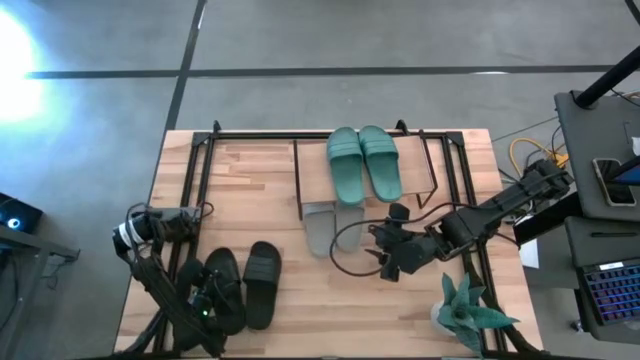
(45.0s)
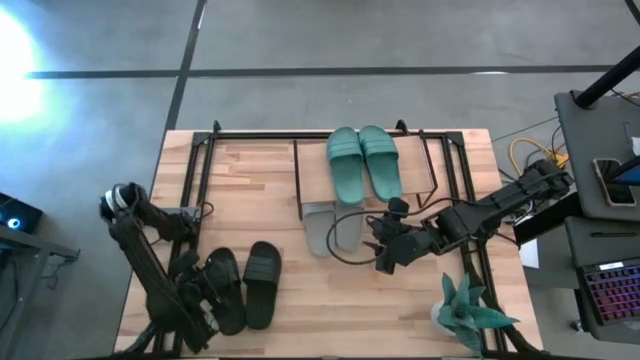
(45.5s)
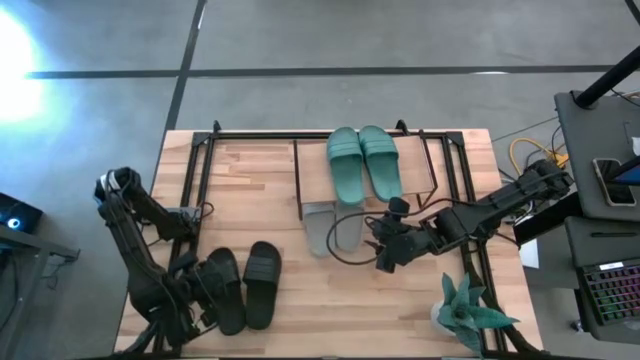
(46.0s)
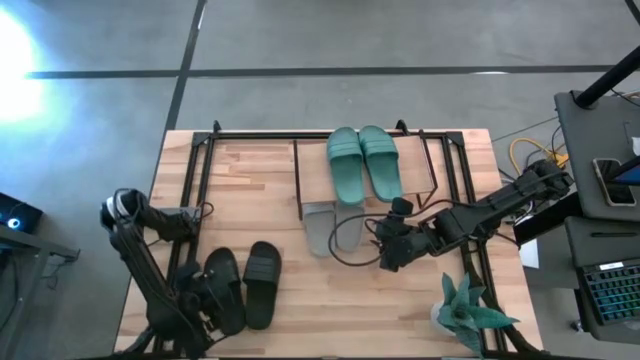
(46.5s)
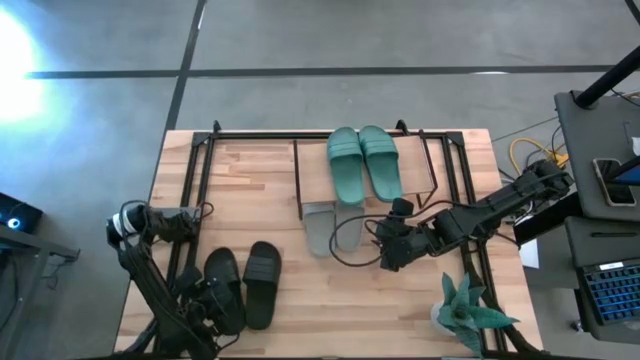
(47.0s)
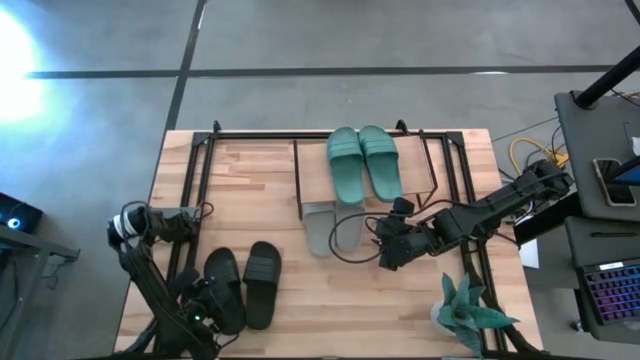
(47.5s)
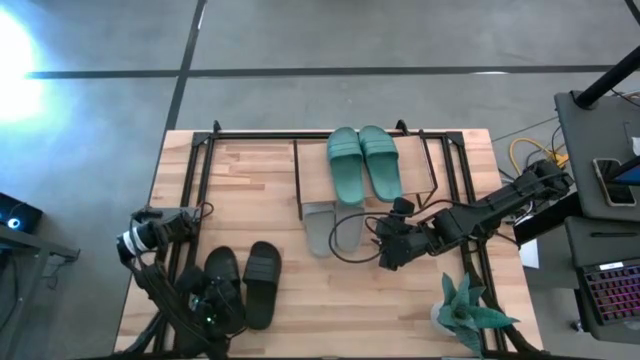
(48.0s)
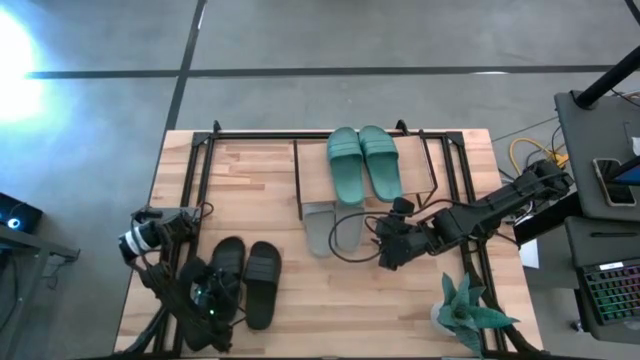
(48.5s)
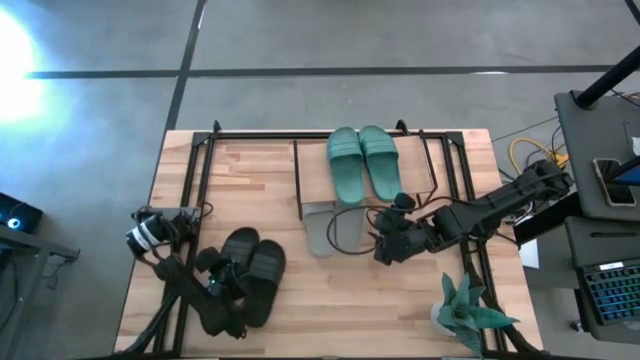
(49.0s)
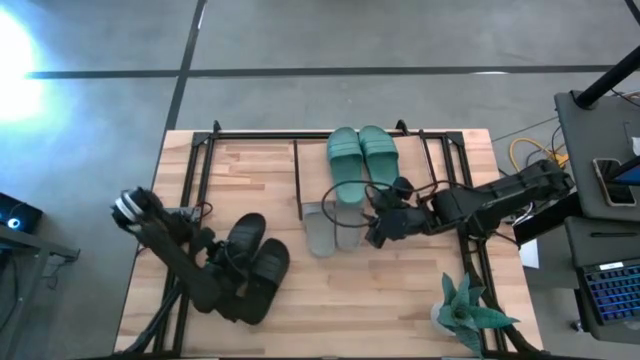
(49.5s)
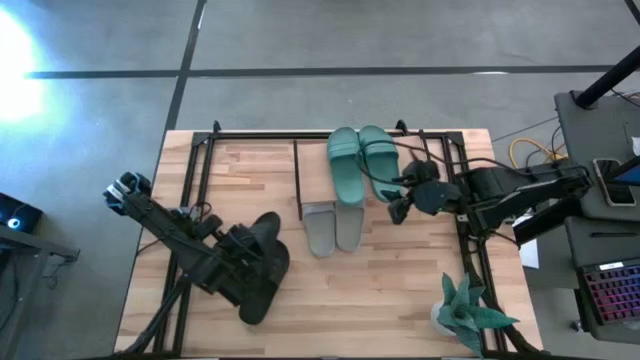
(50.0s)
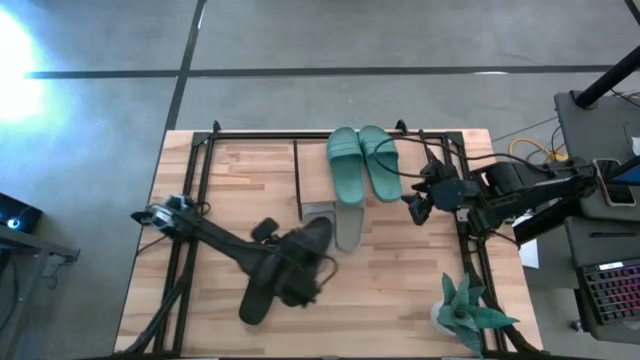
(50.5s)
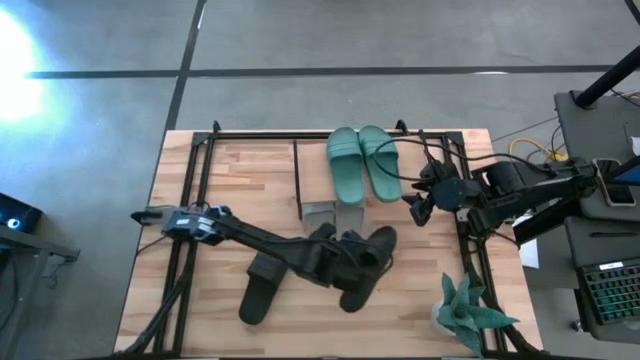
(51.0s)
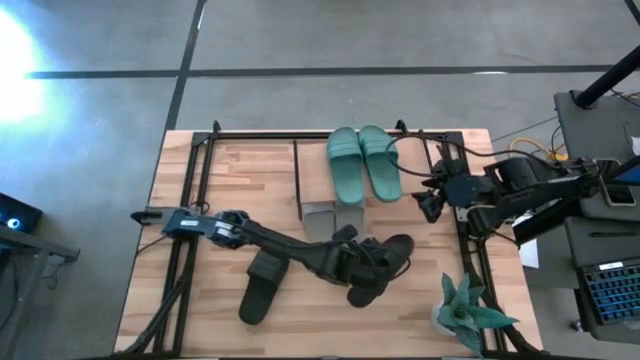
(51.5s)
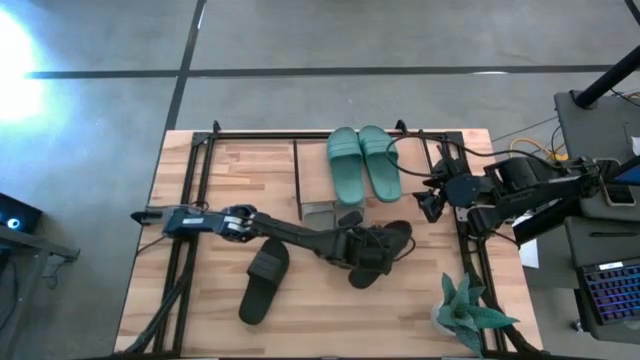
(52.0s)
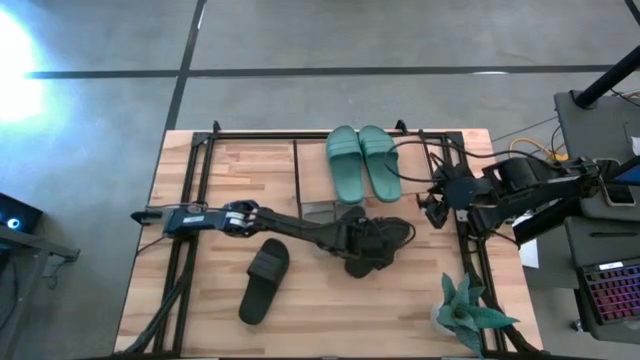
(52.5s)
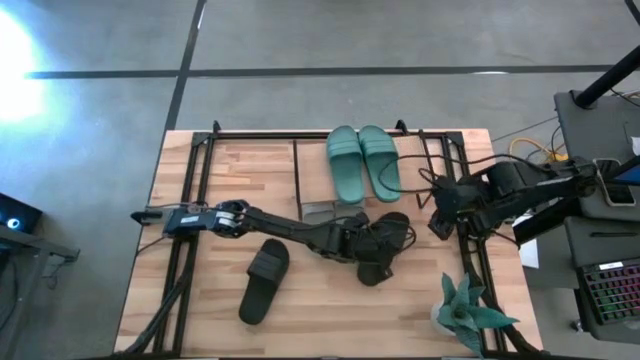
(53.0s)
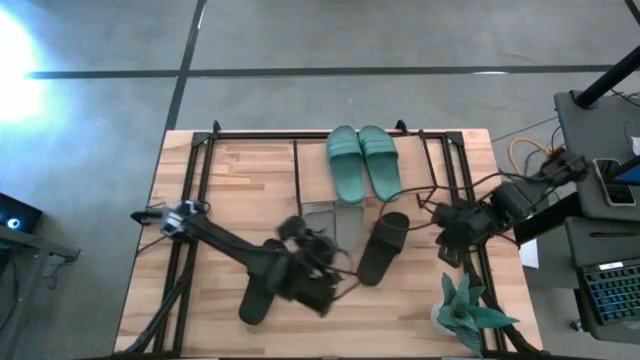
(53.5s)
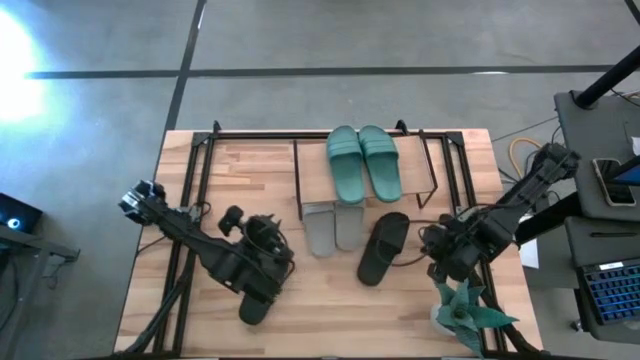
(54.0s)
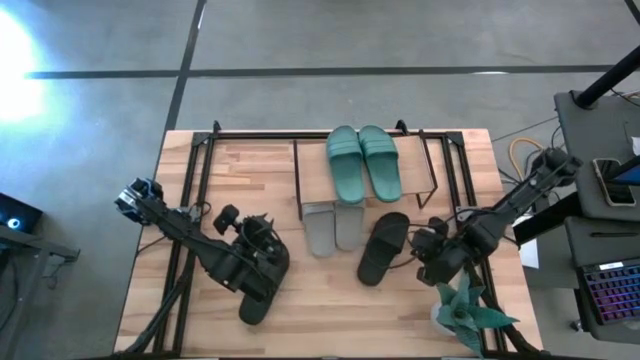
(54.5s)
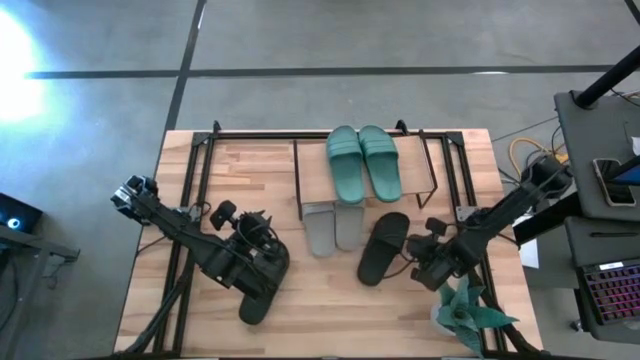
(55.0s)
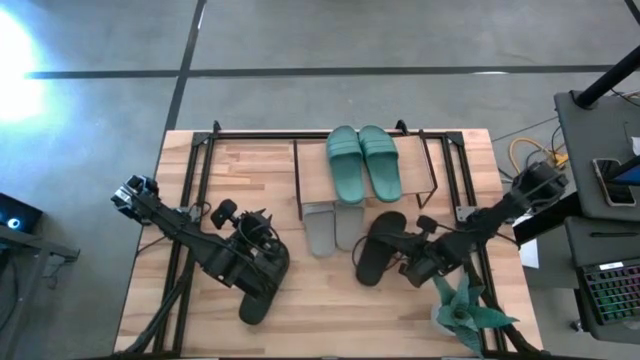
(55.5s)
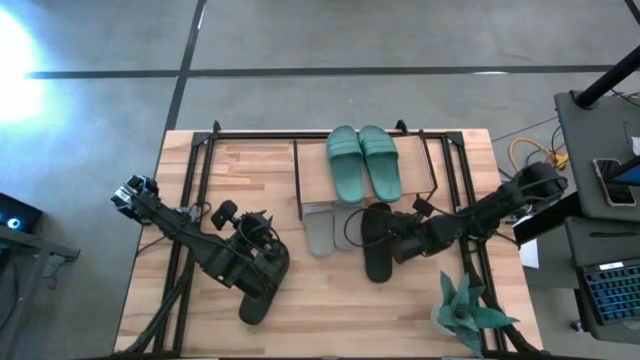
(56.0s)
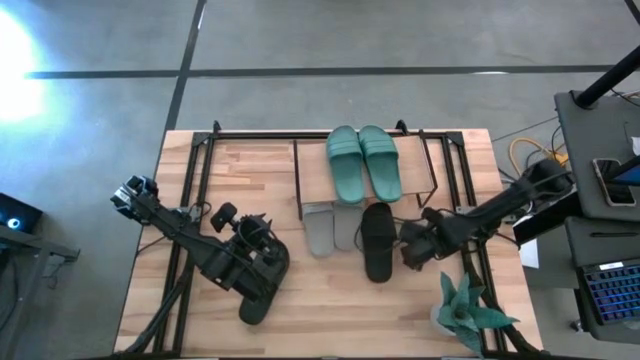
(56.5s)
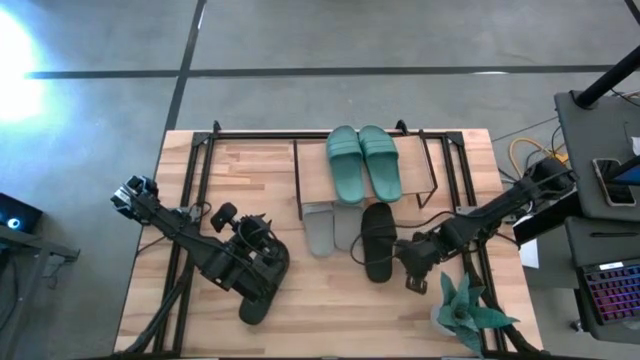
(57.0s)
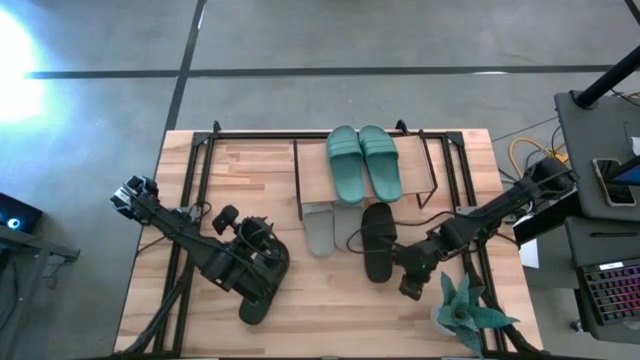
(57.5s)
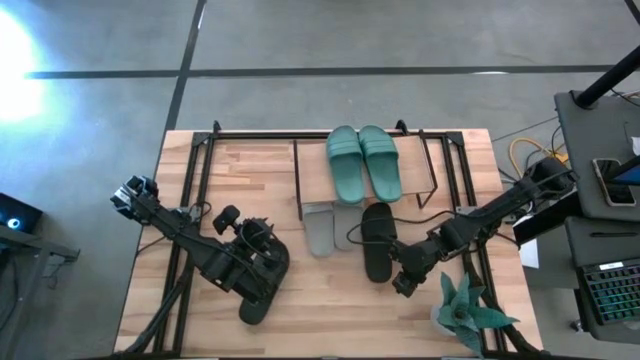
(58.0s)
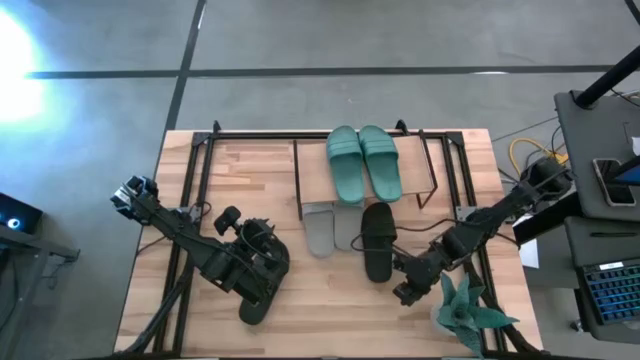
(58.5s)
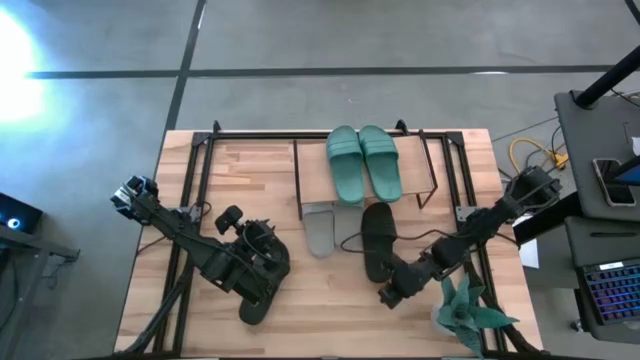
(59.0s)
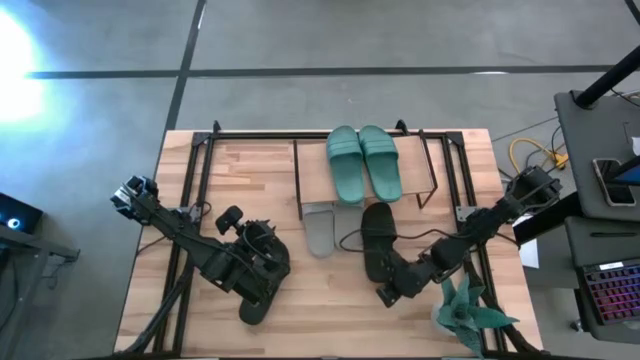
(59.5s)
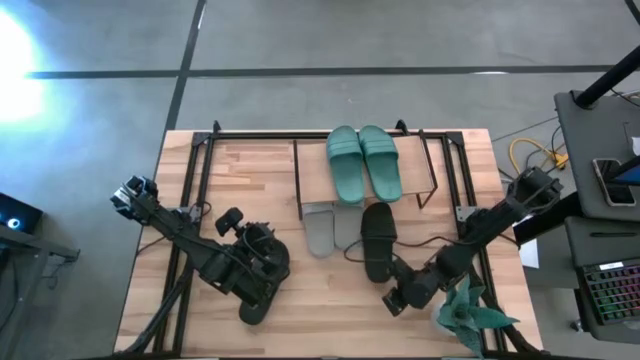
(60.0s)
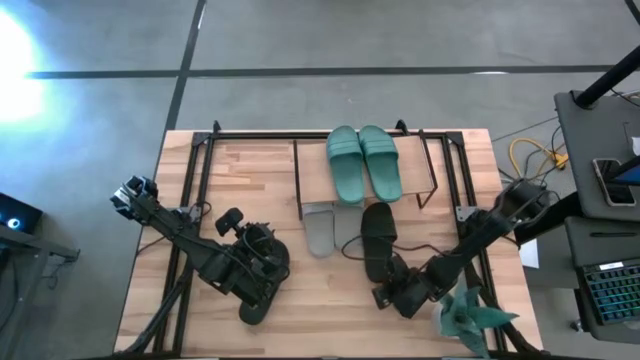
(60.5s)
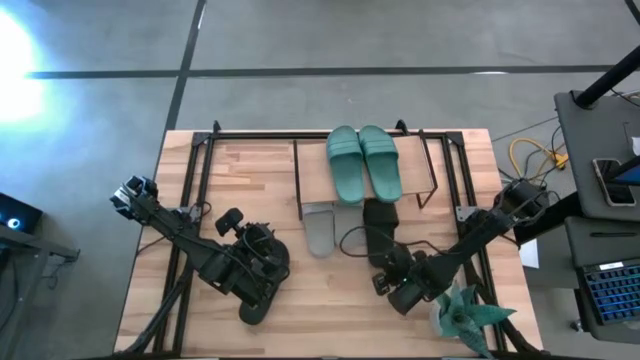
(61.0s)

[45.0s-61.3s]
Task: Pick and place slides into the shelf
Put the left black slide under the shelf

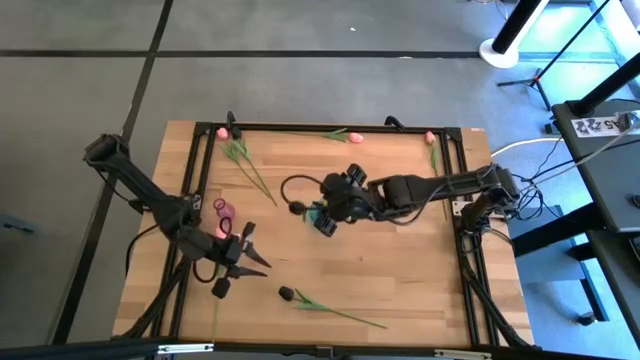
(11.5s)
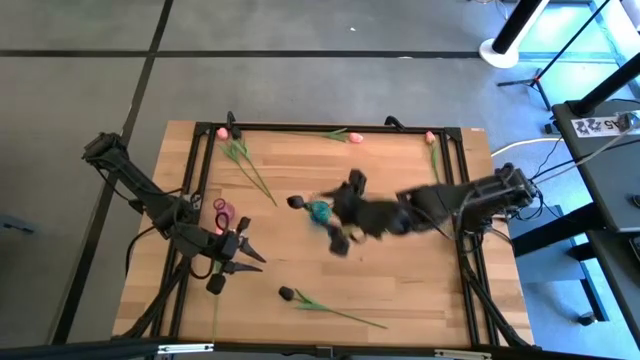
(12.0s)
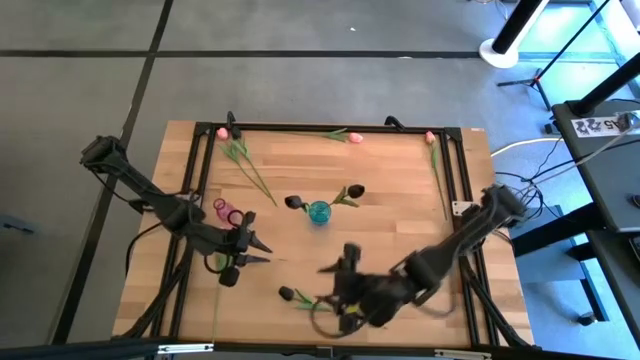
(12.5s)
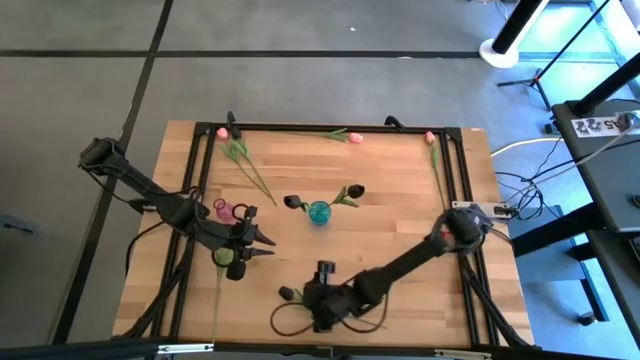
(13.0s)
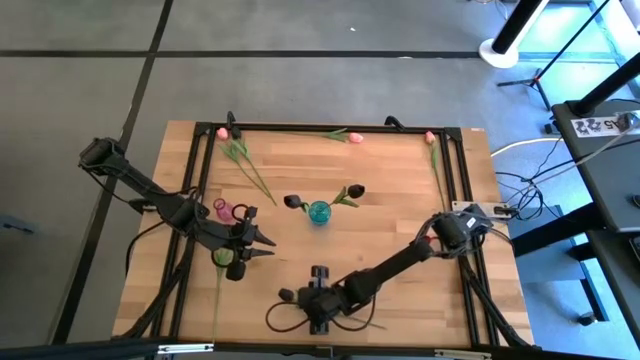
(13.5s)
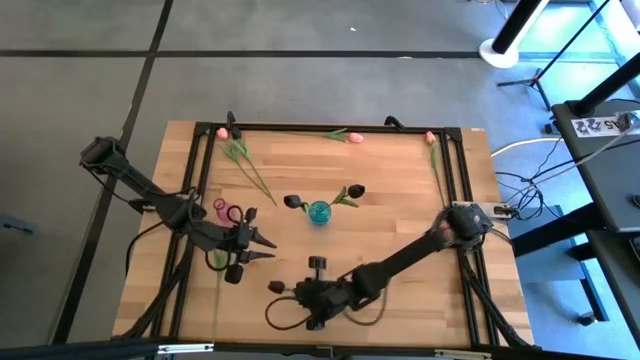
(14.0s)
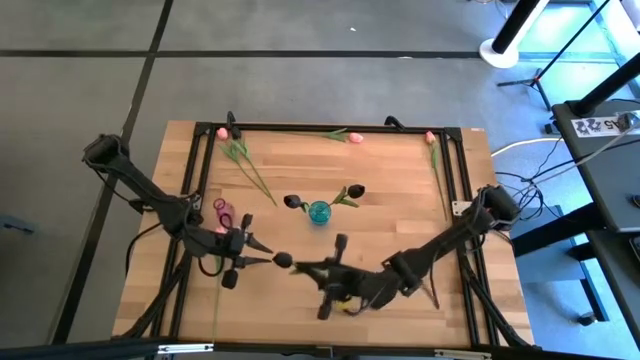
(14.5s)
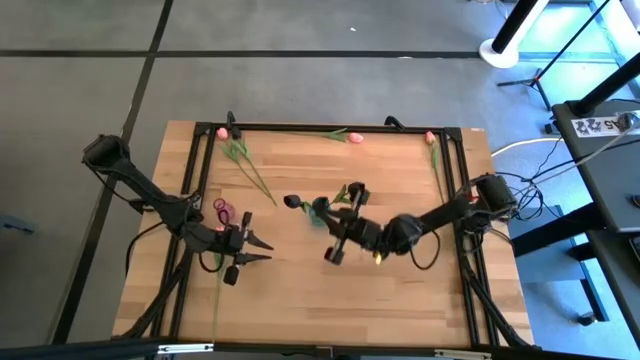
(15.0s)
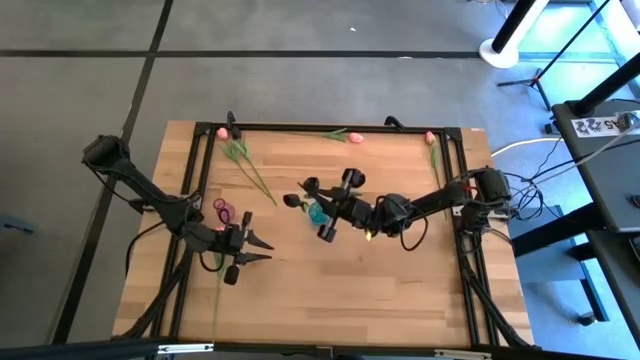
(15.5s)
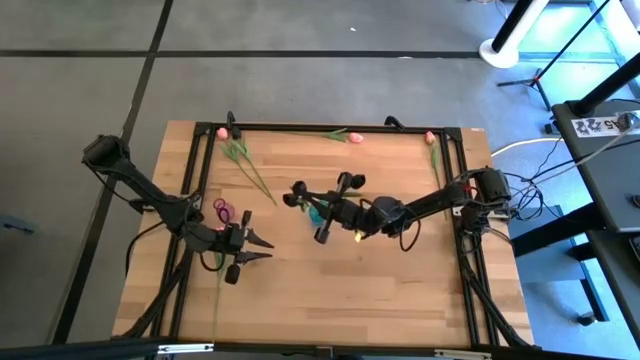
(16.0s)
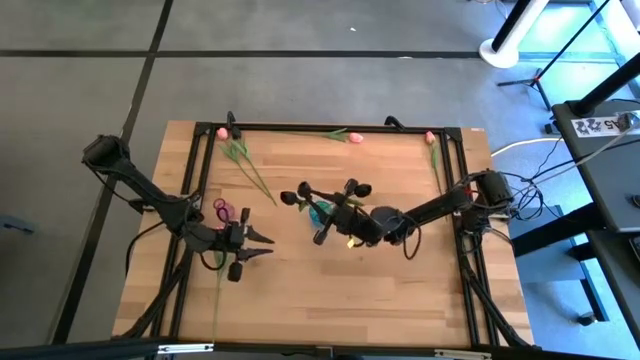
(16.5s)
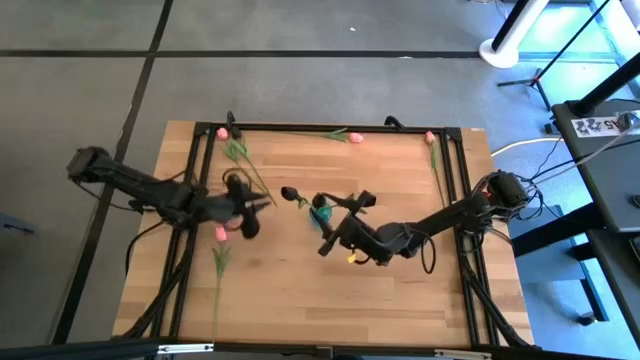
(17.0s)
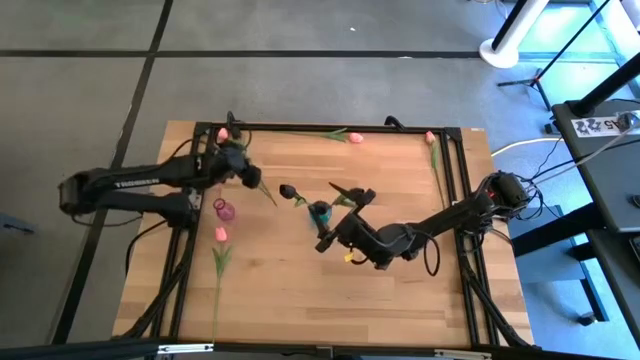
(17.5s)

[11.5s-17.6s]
Task: Sort flowers into vase by color
Put the bottom black tulip into the blue vase
